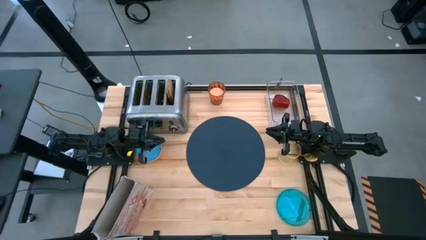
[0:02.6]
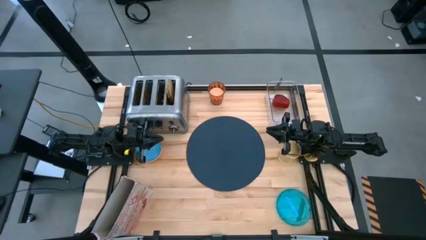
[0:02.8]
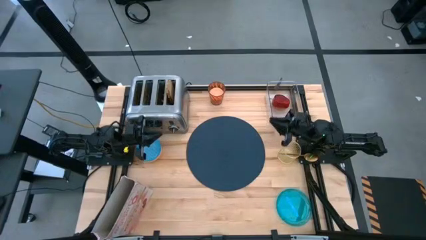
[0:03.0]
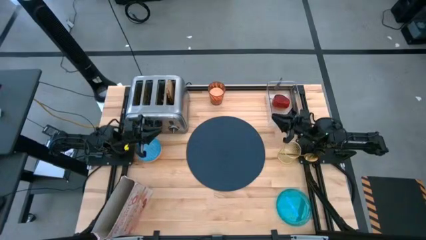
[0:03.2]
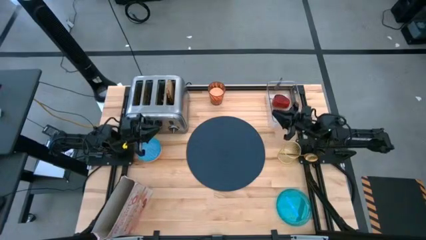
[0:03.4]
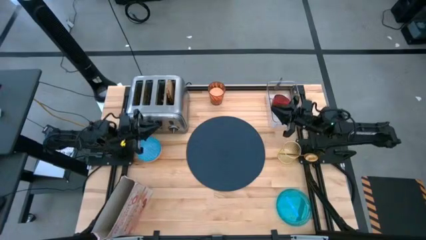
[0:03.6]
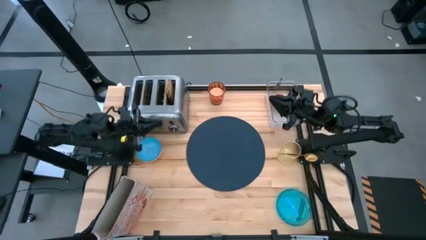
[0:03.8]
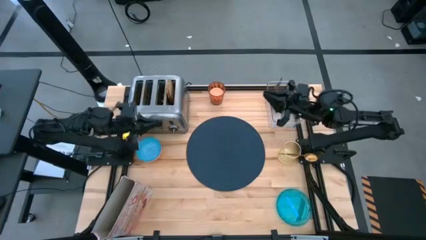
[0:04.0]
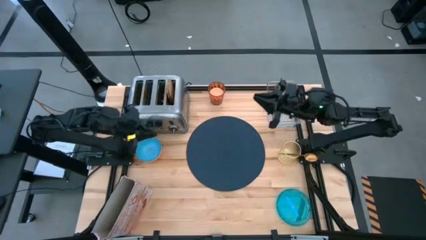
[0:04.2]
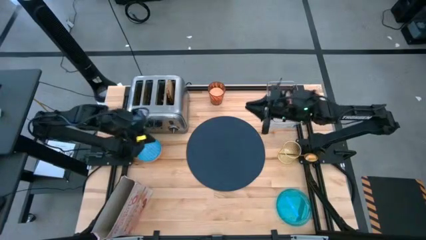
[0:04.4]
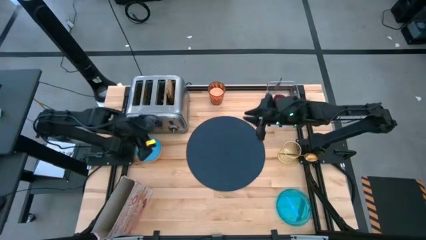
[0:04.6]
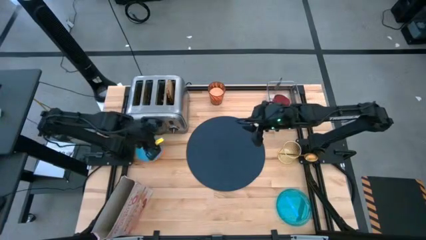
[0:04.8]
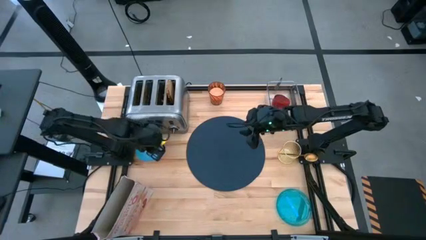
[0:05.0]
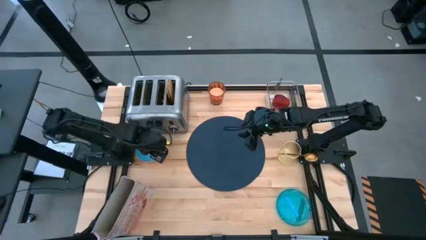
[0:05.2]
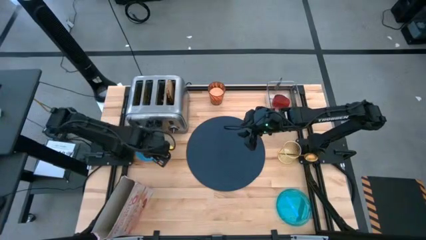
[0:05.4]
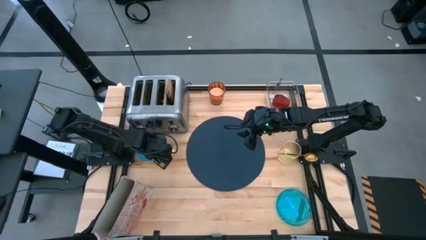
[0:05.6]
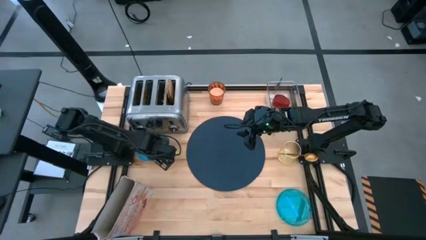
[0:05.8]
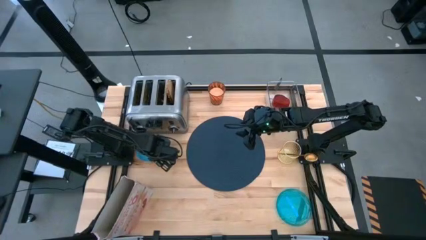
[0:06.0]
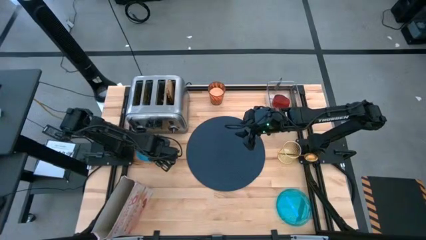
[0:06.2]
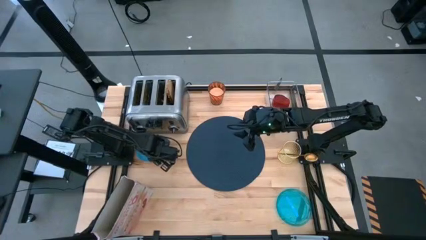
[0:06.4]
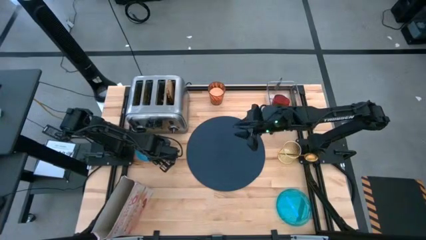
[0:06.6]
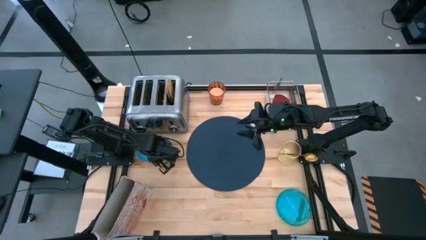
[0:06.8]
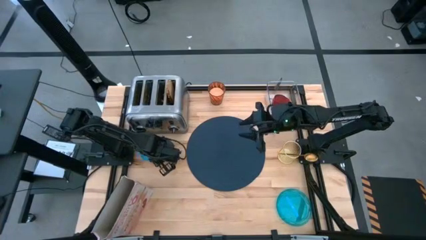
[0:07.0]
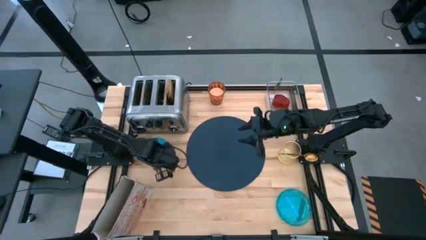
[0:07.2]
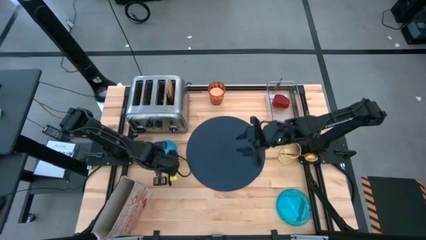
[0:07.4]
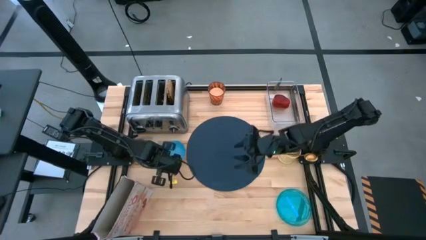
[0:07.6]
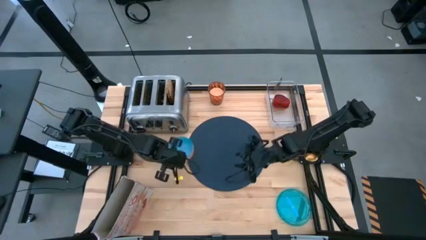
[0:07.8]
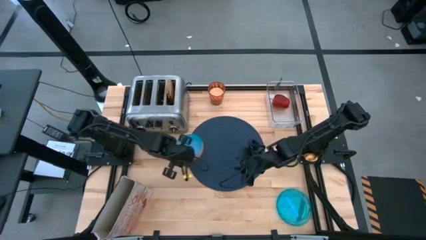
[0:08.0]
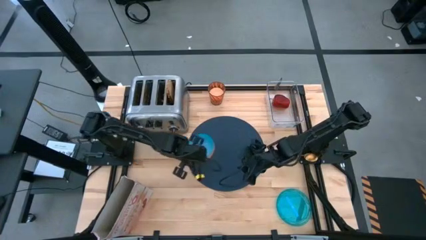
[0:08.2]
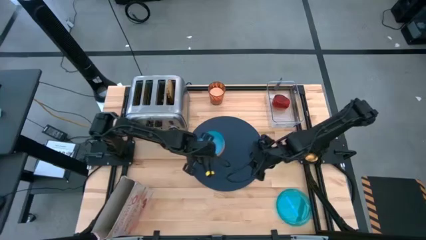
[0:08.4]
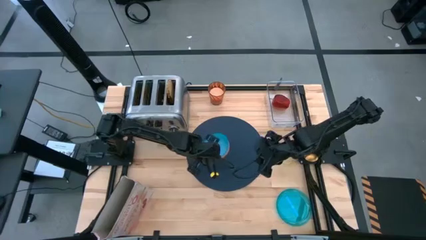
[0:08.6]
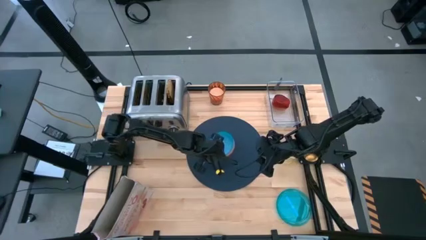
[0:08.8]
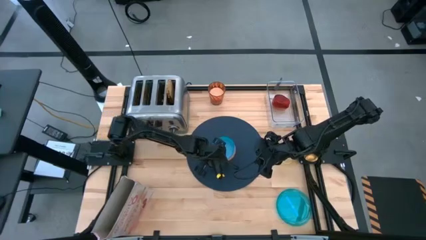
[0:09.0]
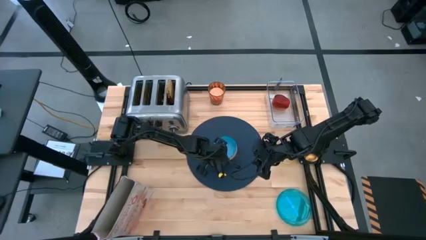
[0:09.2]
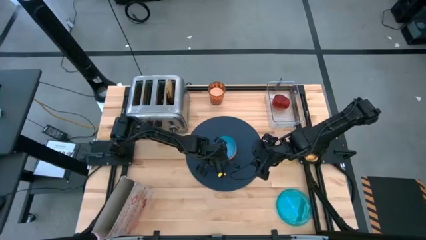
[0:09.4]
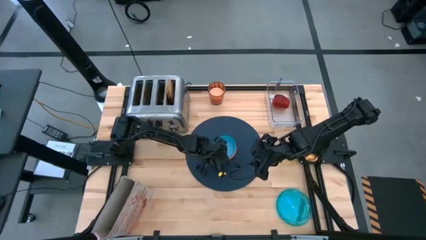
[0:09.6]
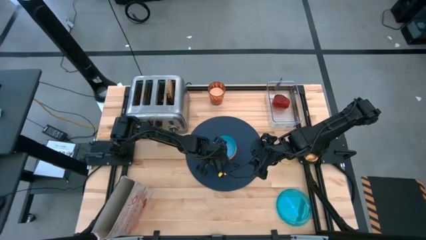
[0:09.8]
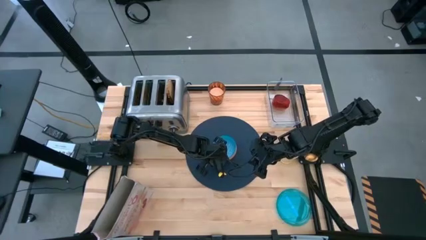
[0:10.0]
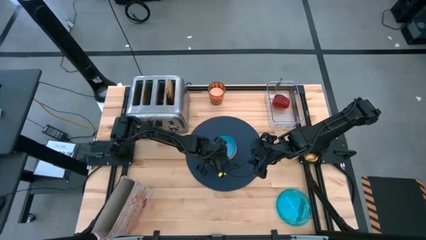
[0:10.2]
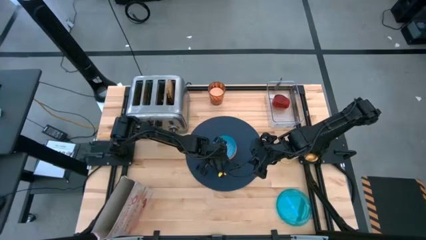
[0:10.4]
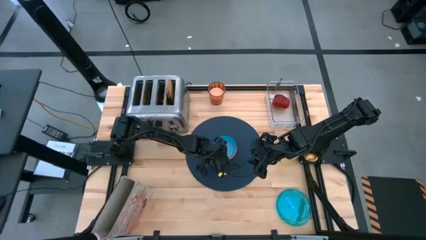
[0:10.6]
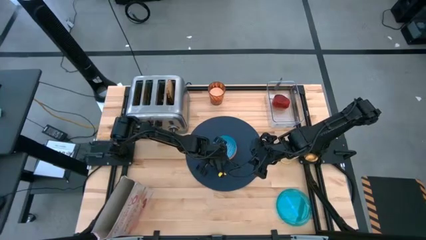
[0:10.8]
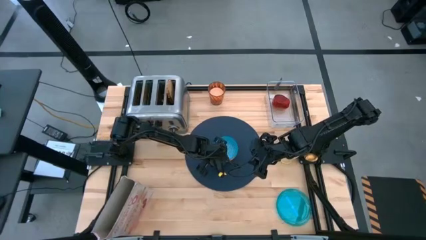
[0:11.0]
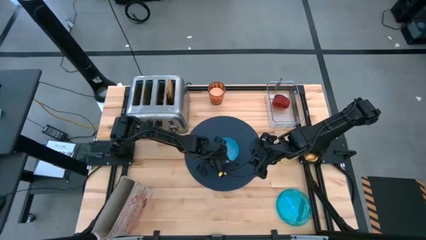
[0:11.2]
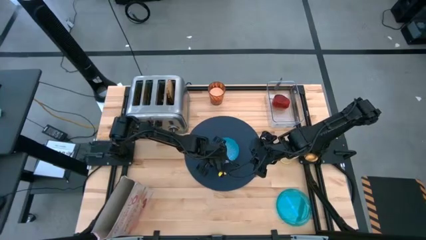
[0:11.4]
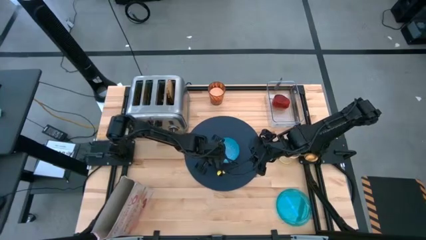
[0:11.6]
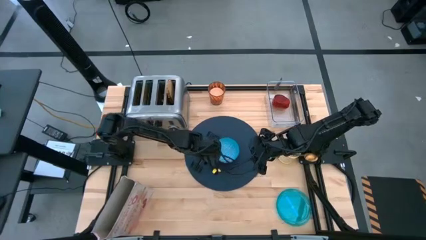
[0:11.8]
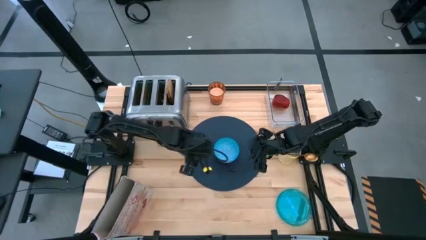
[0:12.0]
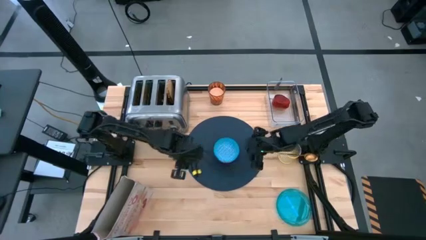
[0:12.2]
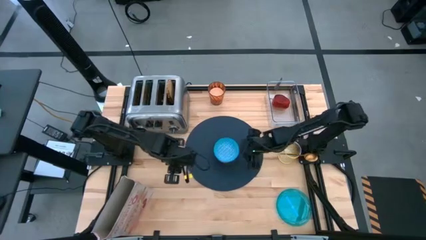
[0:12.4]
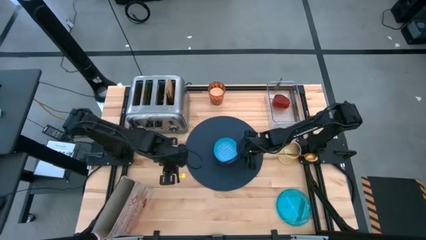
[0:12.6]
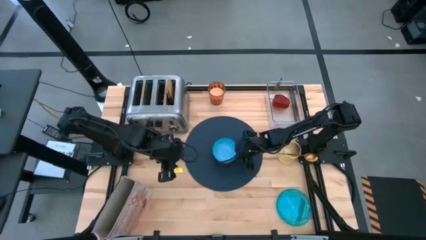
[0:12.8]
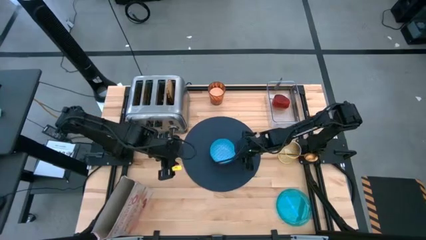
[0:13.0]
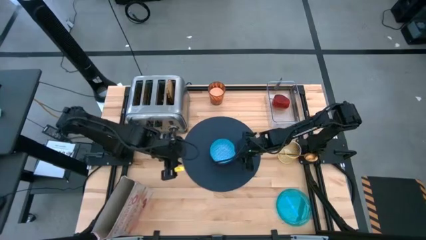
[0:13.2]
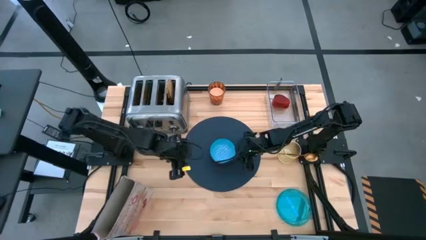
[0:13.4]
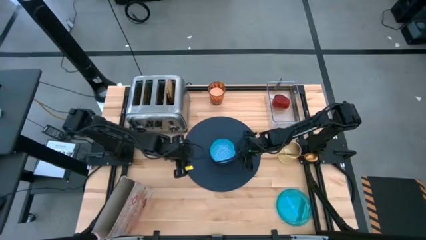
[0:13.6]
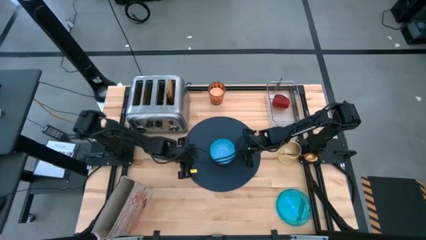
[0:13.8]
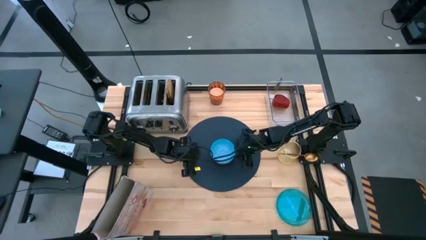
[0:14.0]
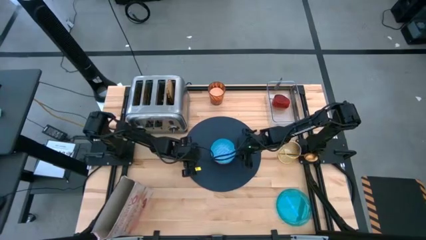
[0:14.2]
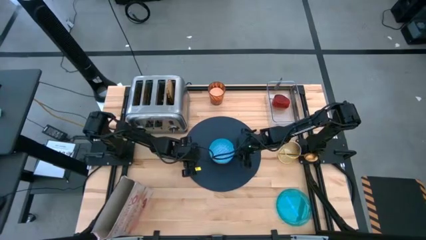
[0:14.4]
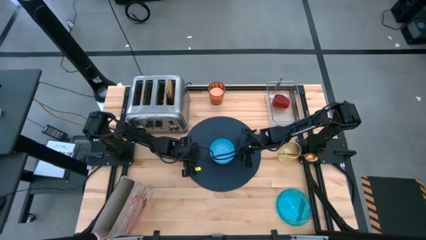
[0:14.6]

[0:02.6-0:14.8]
Task: Arrange a breakfast setting
Put the blue bowl on the blue table mat
